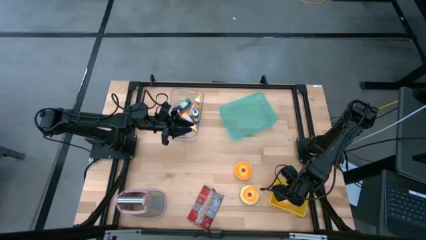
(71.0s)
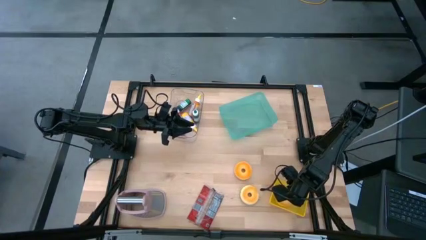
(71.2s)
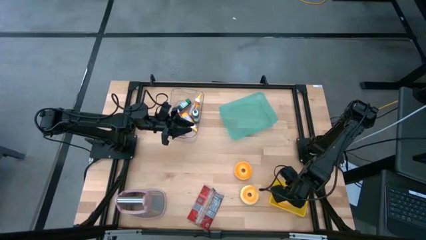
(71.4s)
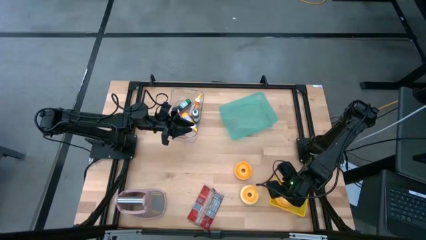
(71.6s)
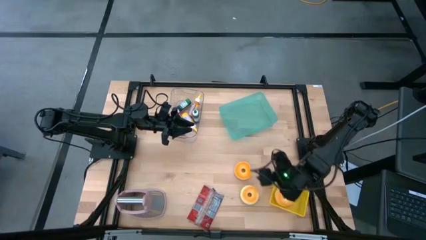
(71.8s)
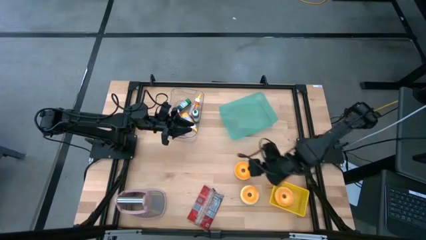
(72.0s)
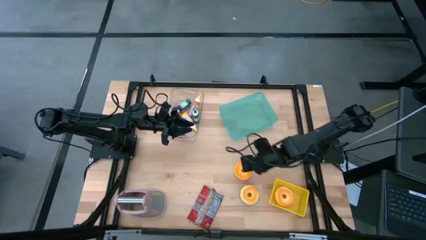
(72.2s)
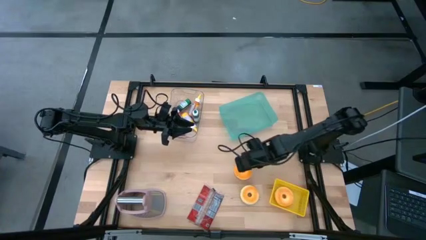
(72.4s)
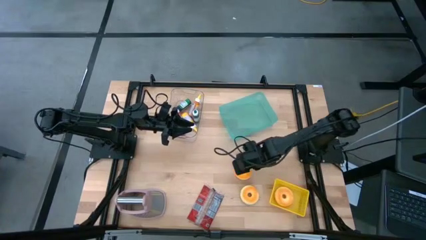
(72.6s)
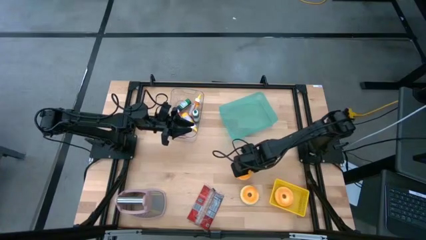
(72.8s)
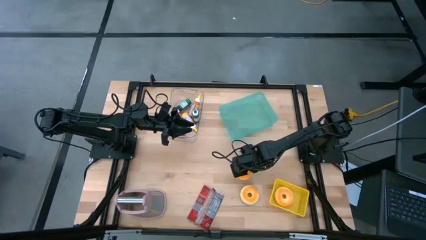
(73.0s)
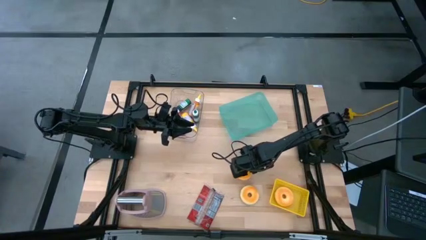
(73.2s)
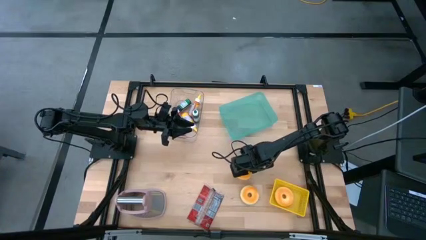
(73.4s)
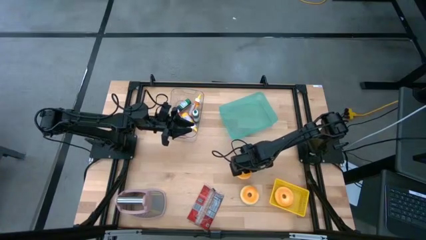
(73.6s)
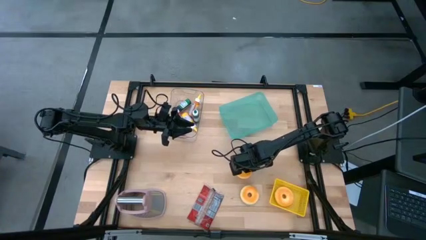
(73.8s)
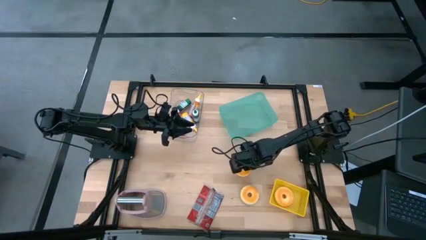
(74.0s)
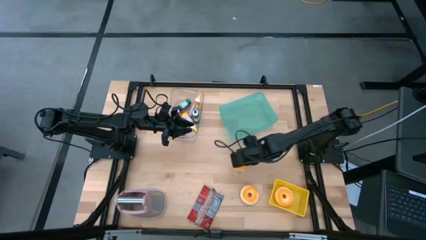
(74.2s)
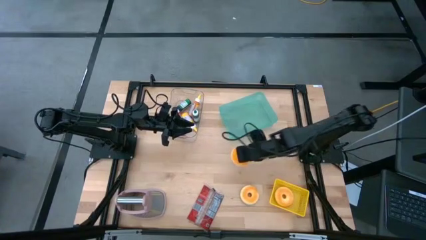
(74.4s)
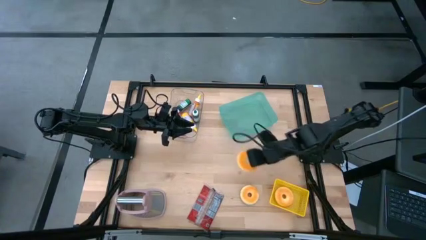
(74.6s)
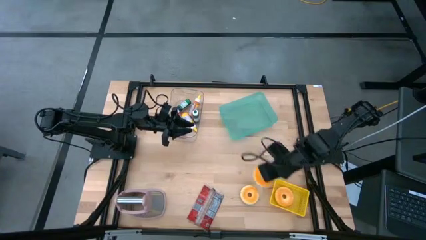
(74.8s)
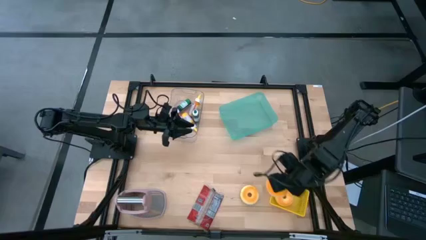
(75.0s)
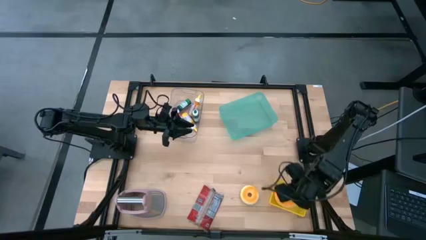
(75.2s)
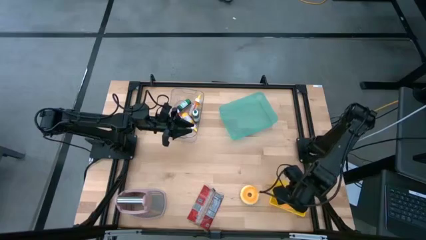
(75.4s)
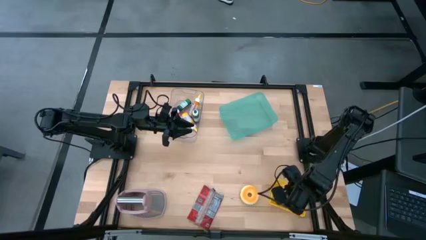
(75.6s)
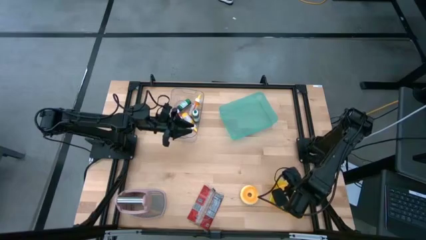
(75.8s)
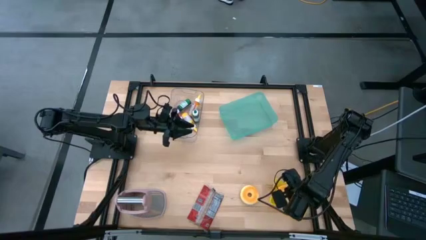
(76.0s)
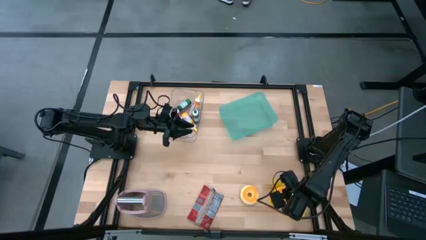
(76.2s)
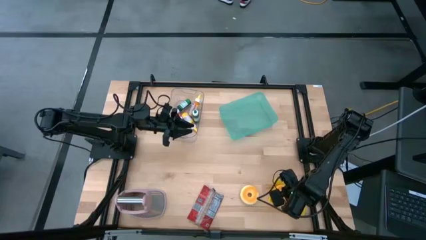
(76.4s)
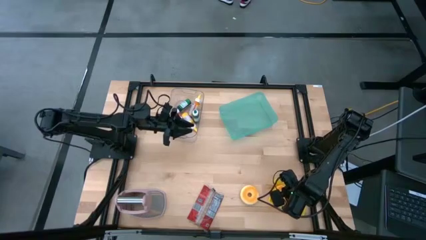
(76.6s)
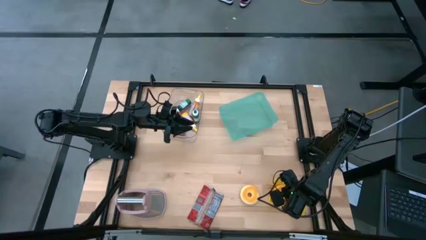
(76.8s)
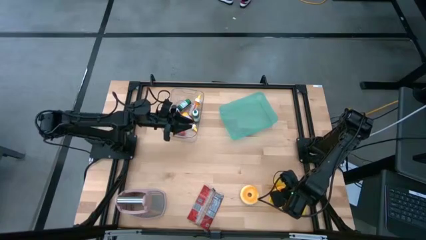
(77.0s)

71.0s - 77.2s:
Put the top blue donut into the yellow bin

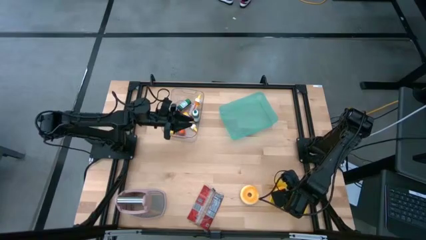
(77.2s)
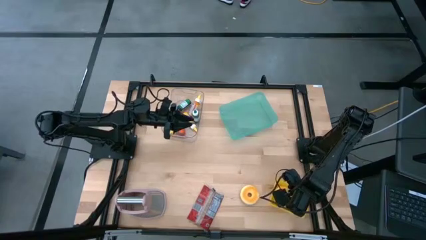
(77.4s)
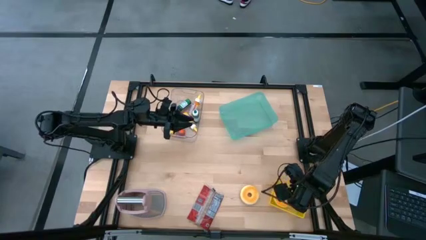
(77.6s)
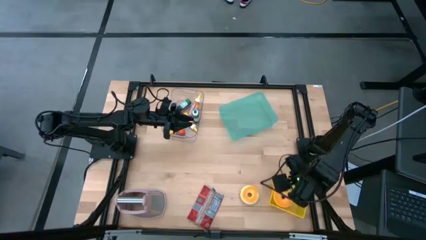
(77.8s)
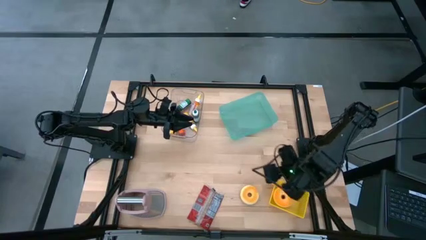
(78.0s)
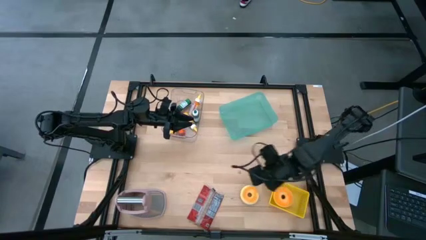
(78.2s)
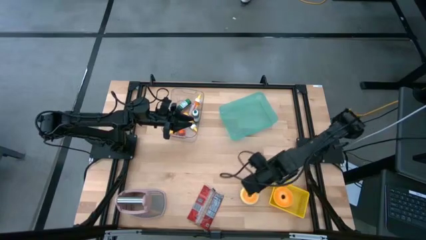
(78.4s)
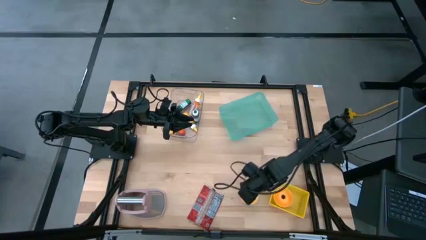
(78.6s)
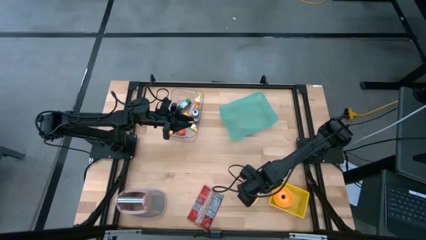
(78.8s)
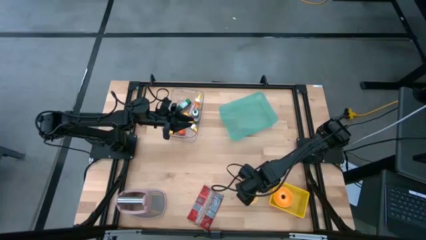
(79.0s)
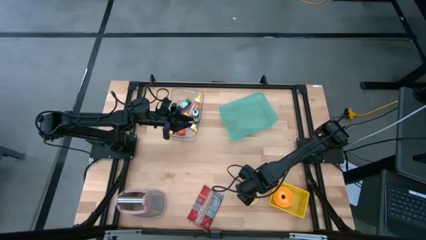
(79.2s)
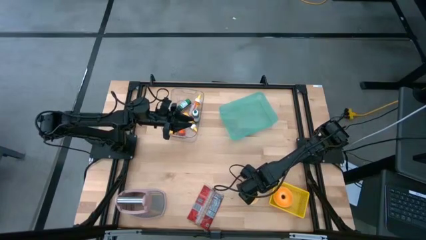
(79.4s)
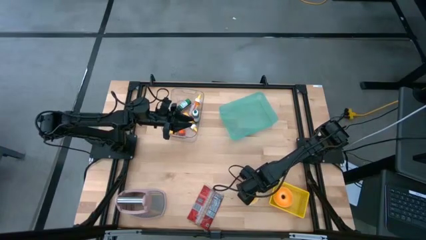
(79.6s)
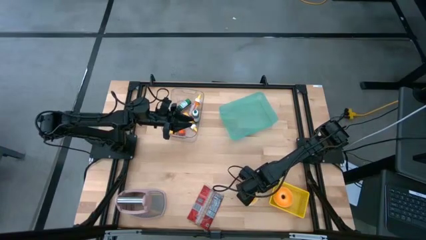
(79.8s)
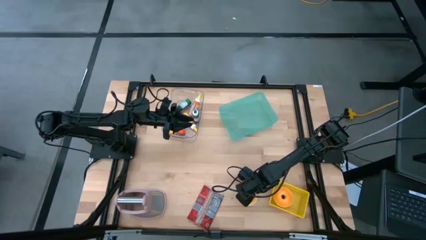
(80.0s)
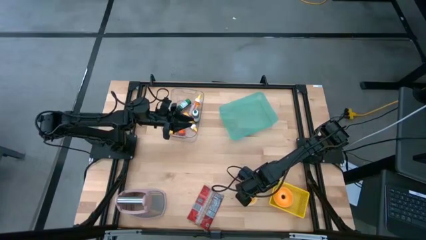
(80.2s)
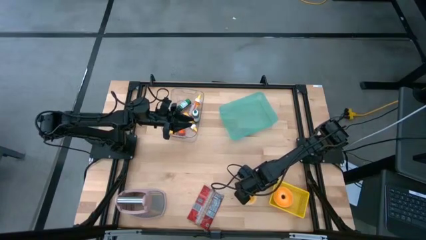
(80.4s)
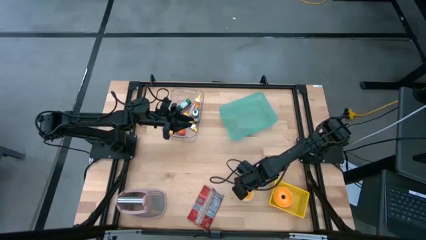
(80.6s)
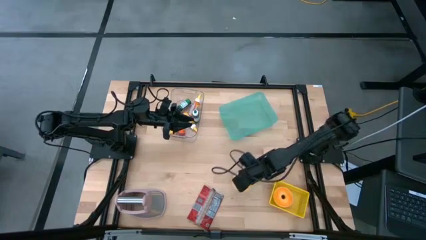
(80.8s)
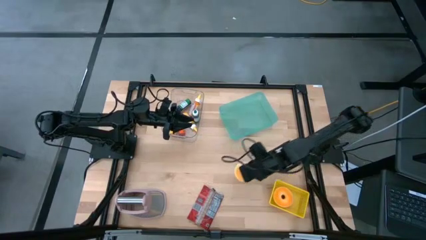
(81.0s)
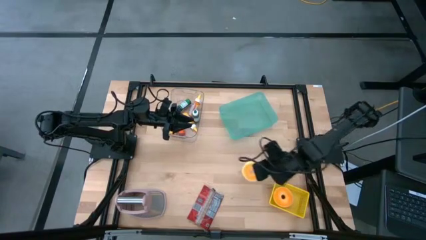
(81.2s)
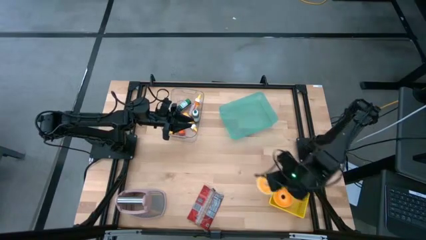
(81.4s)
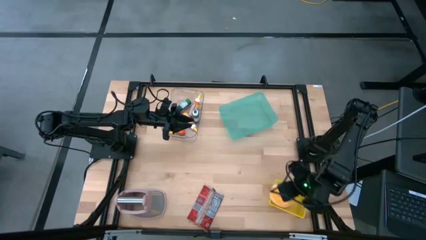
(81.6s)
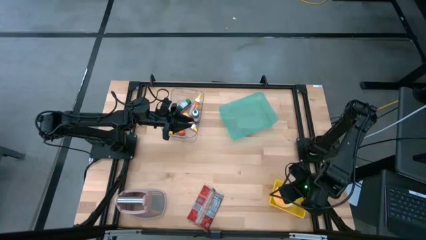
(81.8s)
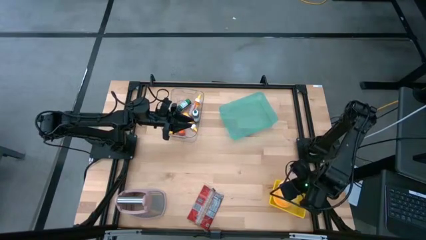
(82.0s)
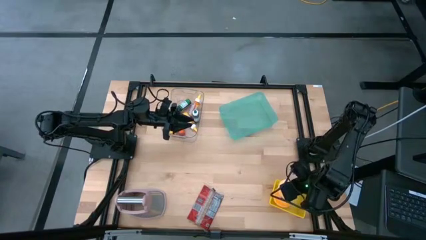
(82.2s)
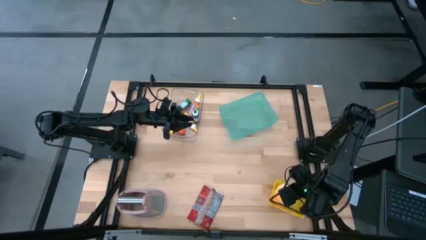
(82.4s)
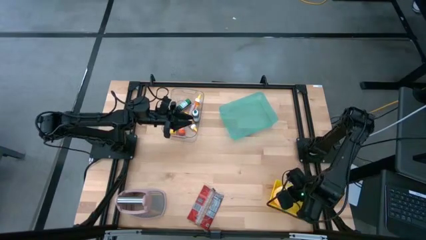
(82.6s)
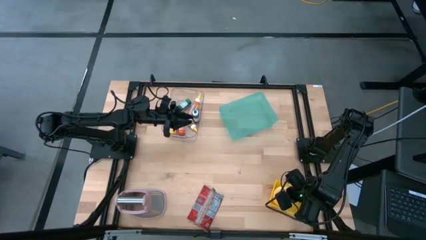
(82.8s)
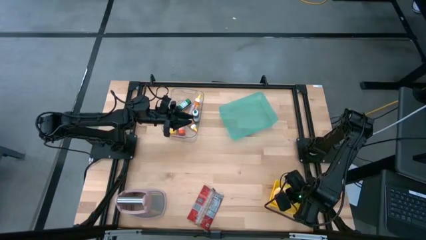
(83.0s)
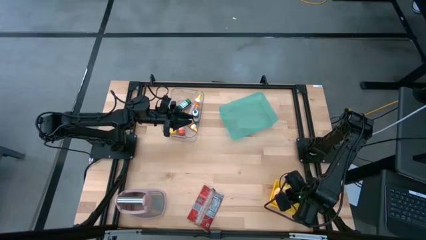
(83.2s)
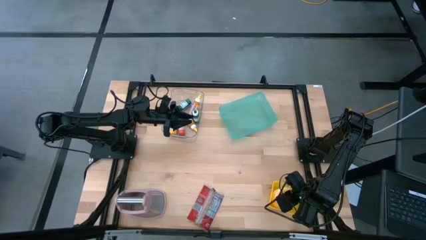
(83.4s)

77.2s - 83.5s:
Put the blue donut into the yellow bin

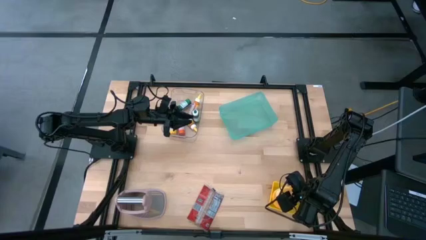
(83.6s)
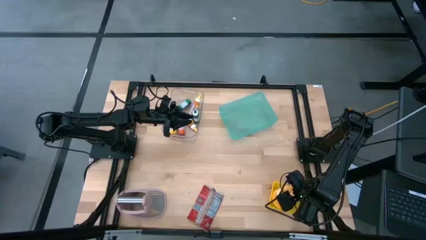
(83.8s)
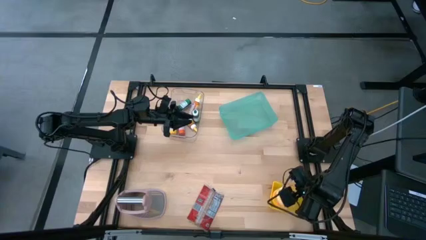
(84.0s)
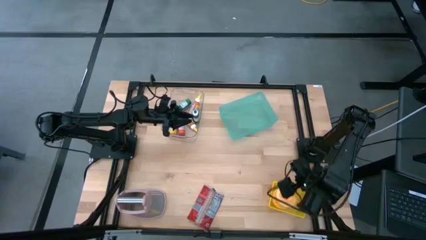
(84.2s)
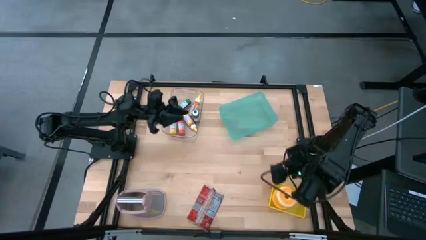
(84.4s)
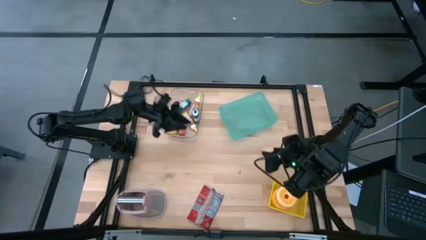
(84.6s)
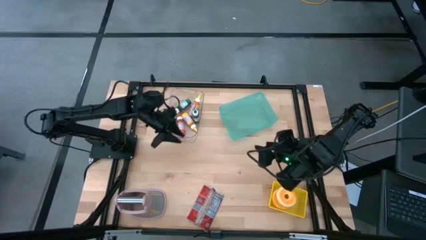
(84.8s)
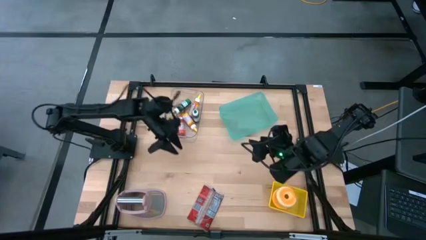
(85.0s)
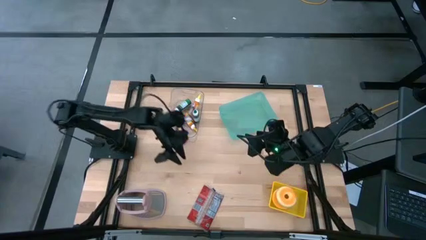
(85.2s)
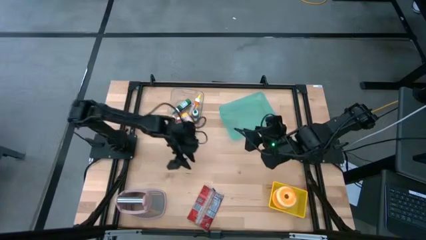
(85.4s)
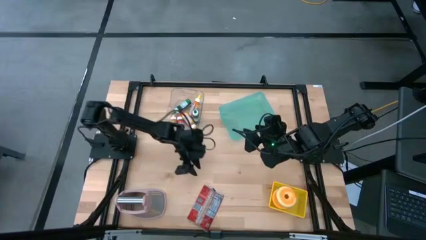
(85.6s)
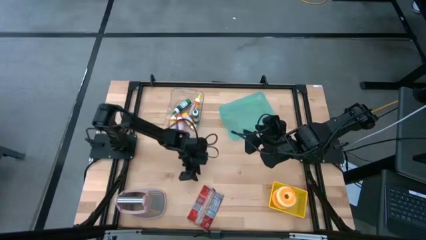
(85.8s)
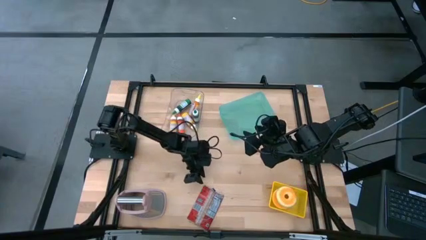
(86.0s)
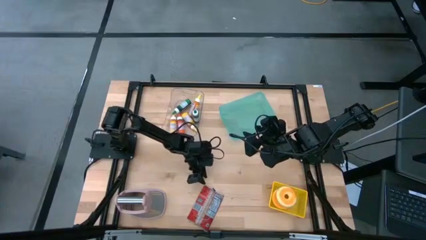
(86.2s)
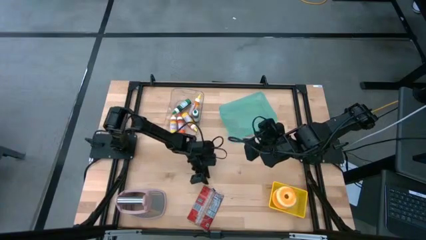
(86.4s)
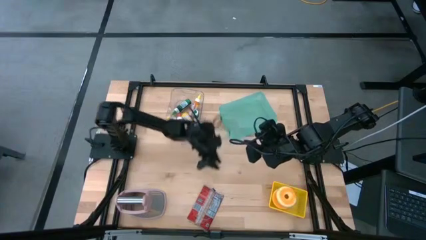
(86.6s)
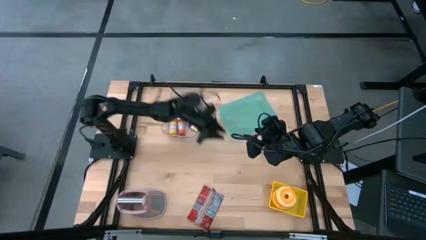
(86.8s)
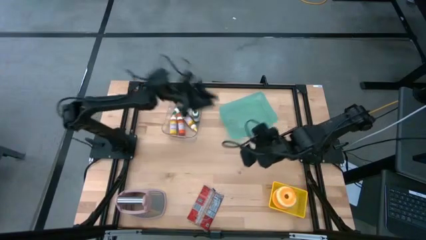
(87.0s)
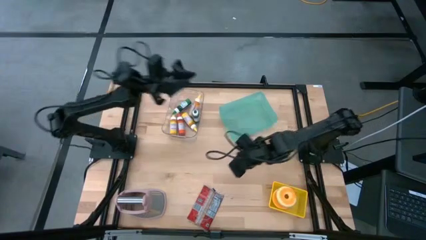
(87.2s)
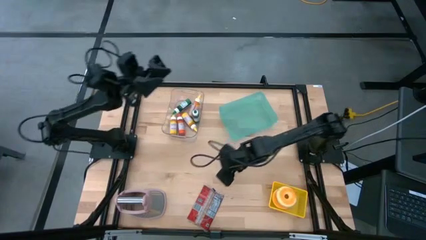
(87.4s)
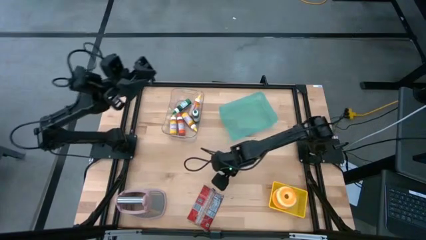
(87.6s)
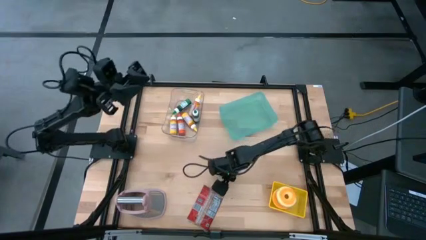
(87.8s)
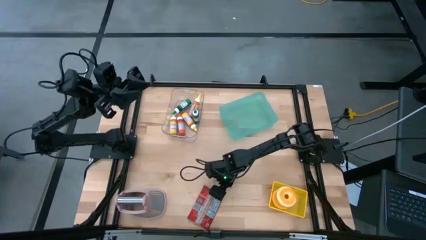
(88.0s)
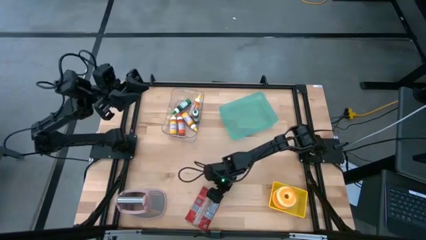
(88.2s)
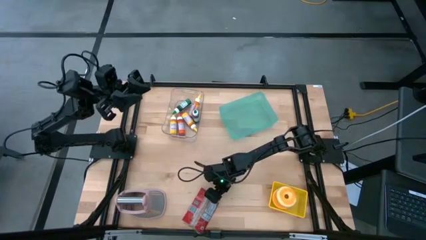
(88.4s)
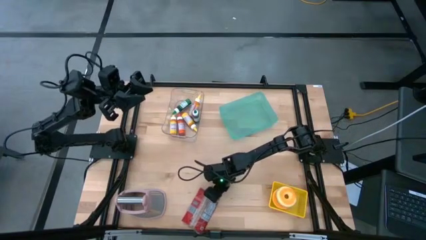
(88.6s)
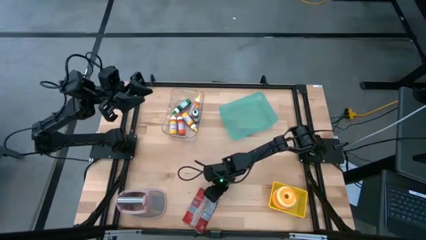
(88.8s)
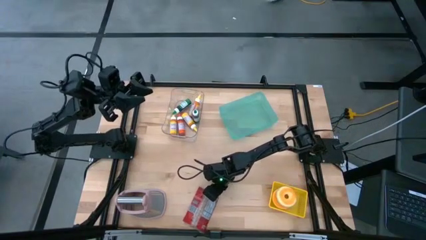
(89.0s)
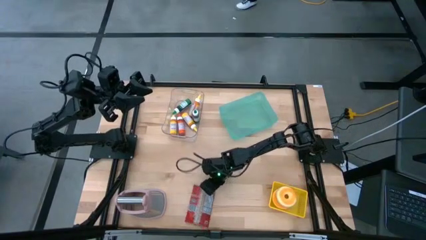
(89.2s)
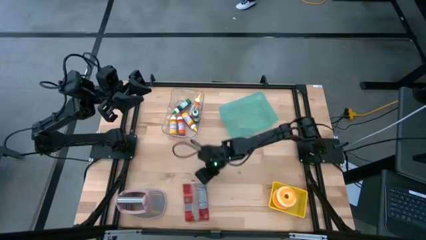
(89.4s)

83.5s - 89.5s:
Put the red popcorn bag into the blue bin
